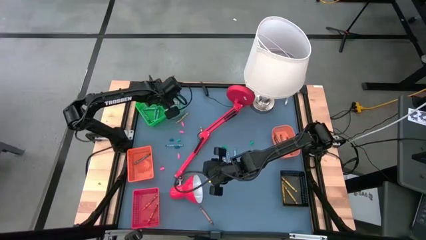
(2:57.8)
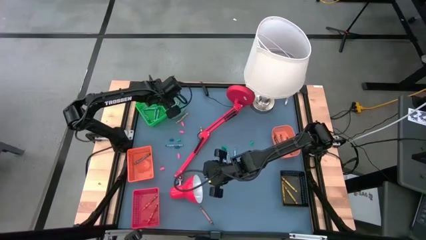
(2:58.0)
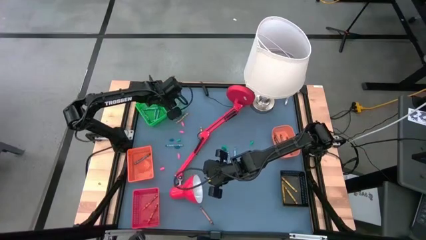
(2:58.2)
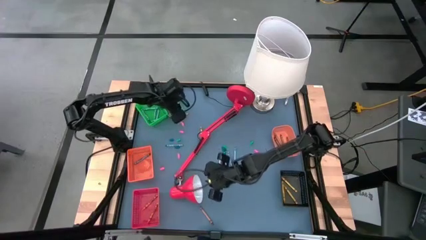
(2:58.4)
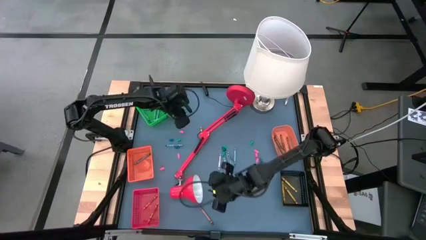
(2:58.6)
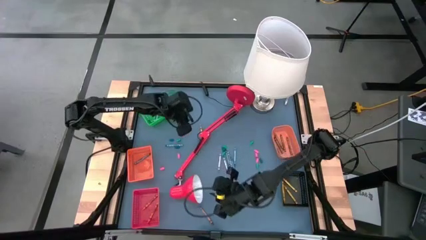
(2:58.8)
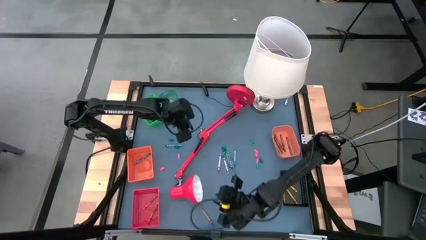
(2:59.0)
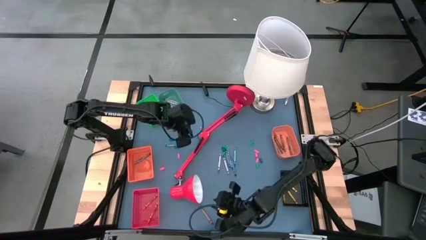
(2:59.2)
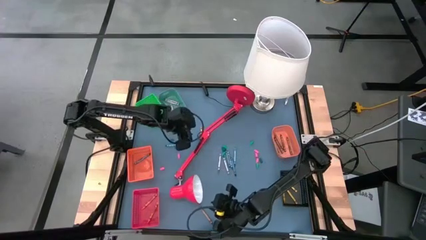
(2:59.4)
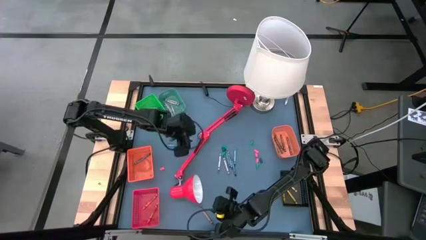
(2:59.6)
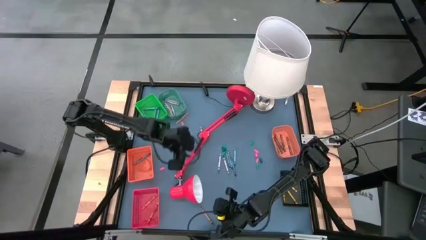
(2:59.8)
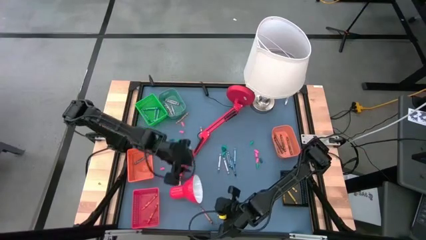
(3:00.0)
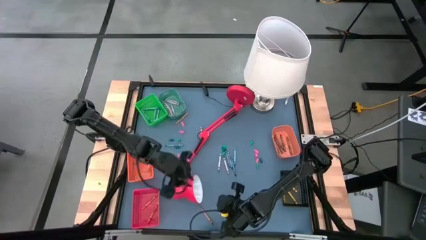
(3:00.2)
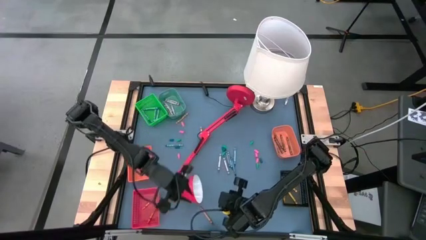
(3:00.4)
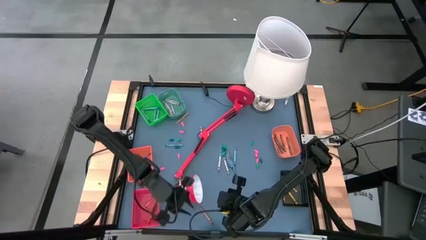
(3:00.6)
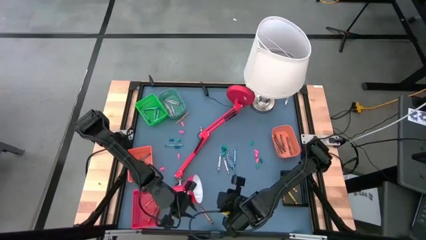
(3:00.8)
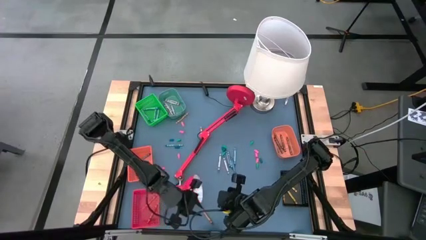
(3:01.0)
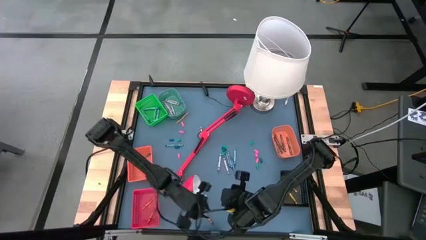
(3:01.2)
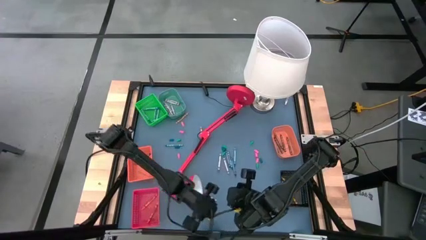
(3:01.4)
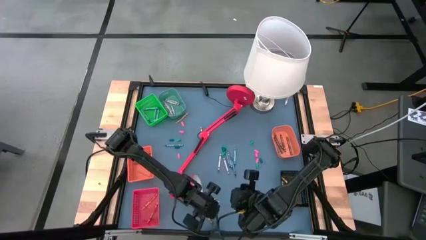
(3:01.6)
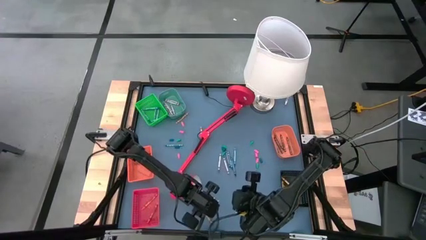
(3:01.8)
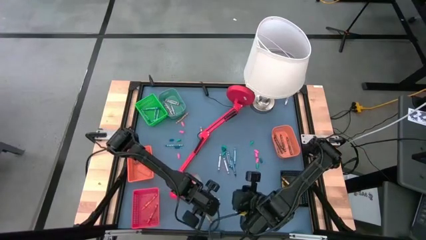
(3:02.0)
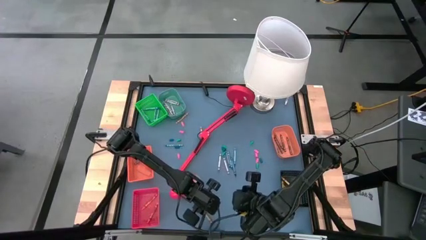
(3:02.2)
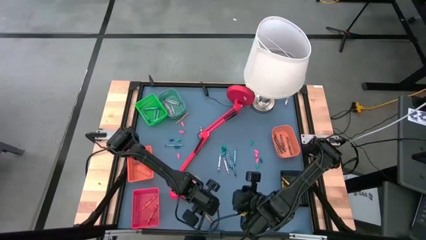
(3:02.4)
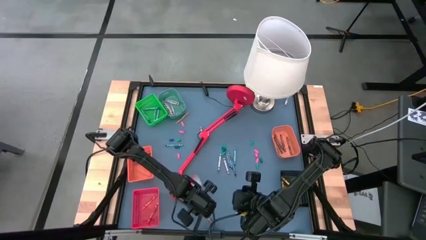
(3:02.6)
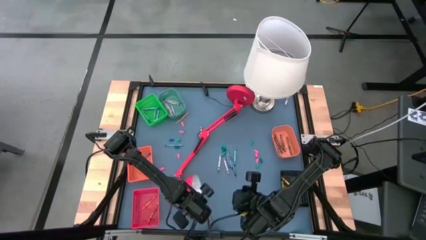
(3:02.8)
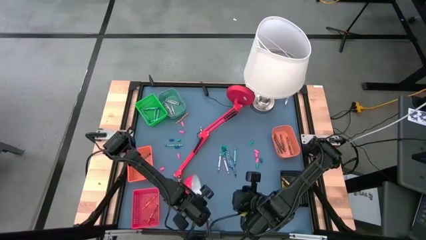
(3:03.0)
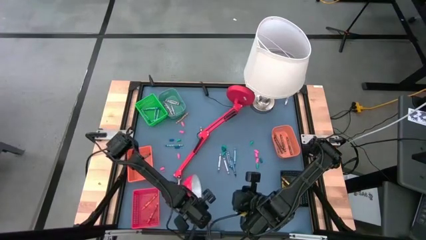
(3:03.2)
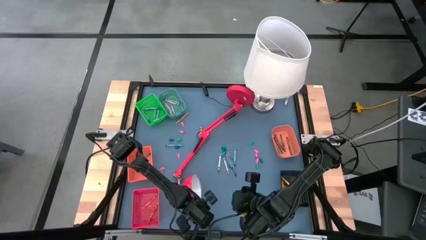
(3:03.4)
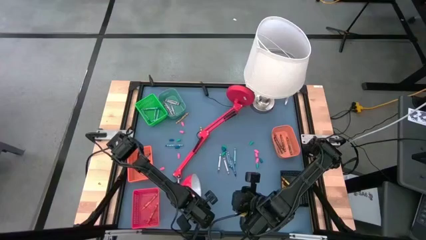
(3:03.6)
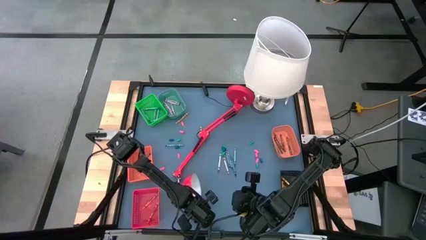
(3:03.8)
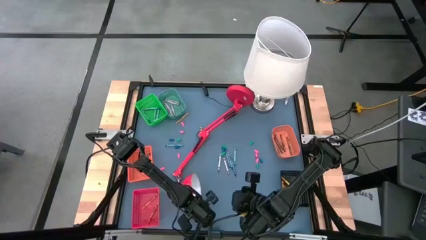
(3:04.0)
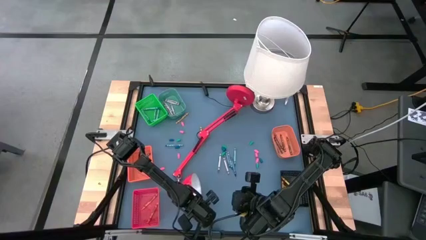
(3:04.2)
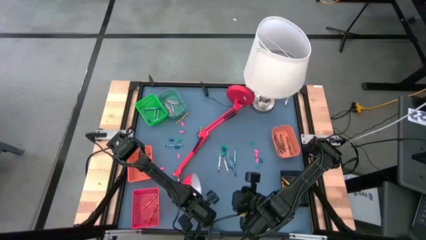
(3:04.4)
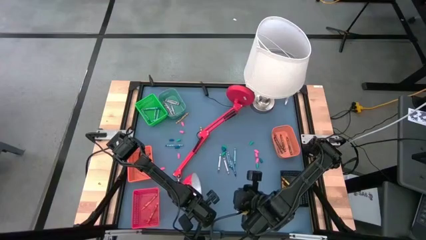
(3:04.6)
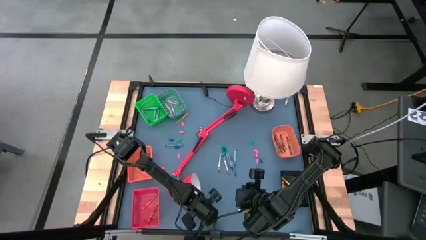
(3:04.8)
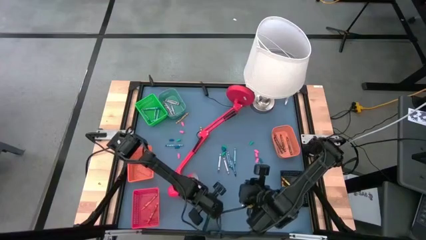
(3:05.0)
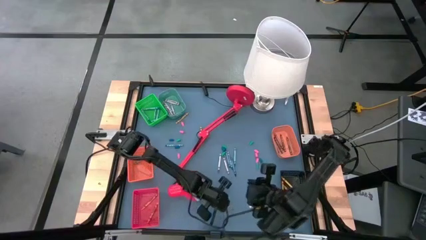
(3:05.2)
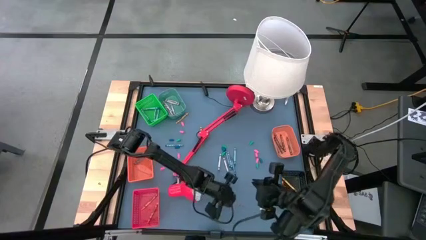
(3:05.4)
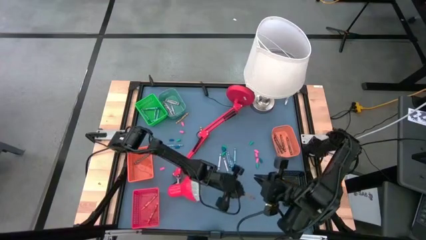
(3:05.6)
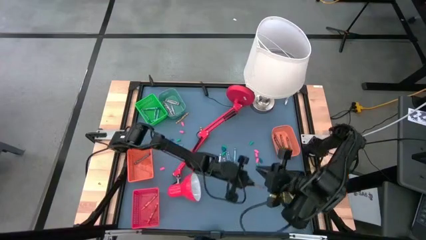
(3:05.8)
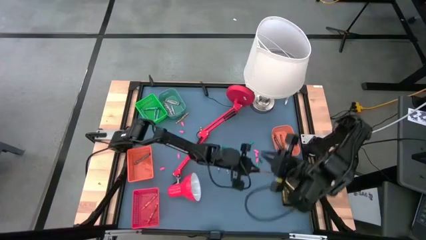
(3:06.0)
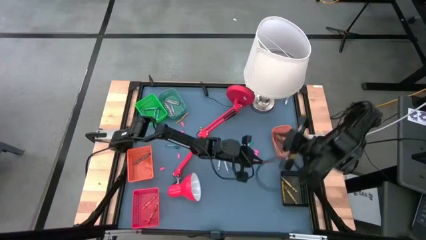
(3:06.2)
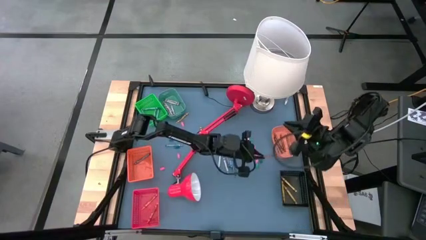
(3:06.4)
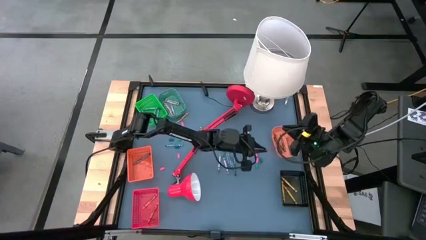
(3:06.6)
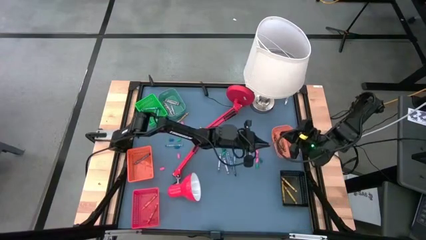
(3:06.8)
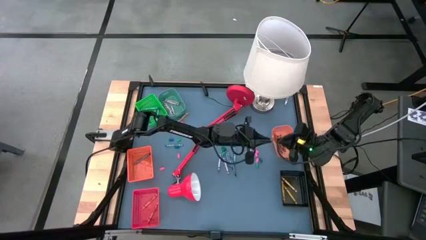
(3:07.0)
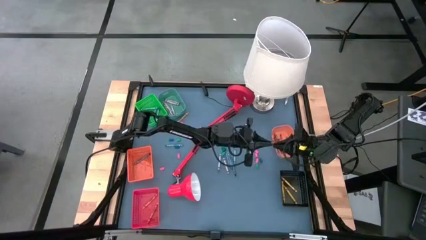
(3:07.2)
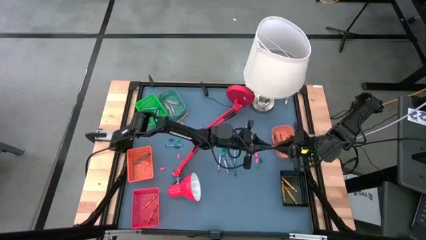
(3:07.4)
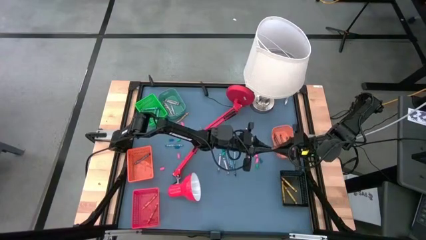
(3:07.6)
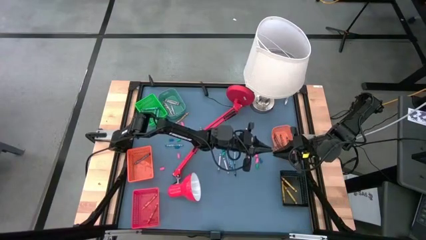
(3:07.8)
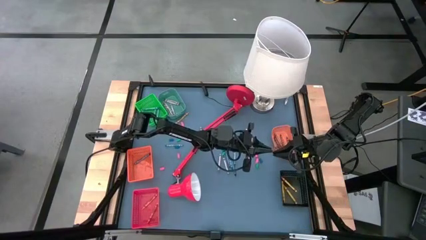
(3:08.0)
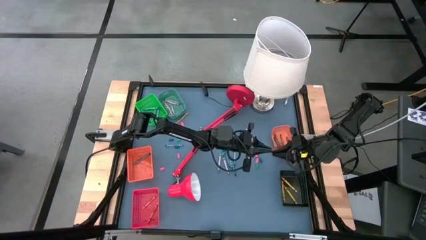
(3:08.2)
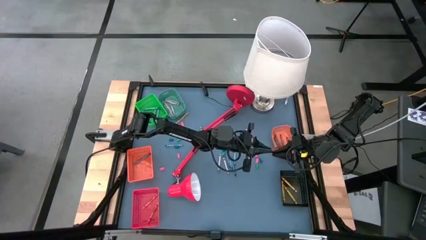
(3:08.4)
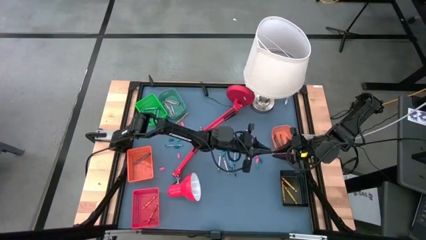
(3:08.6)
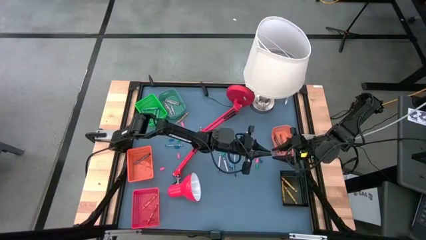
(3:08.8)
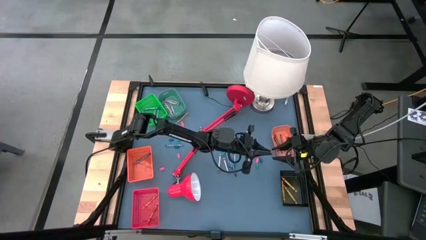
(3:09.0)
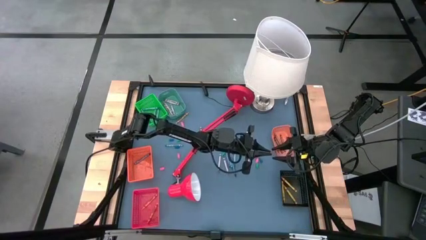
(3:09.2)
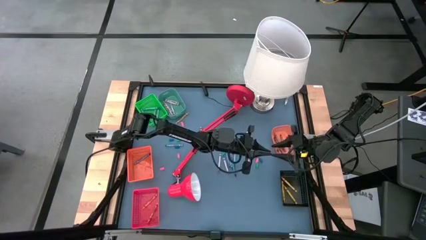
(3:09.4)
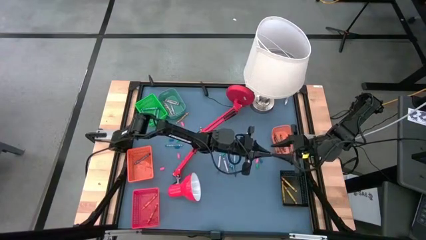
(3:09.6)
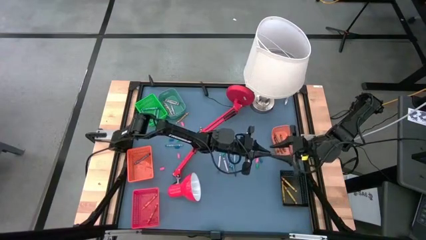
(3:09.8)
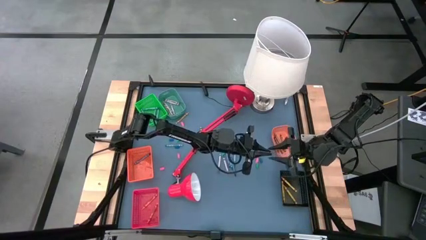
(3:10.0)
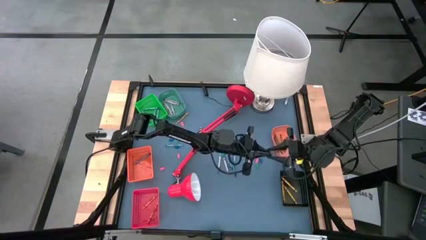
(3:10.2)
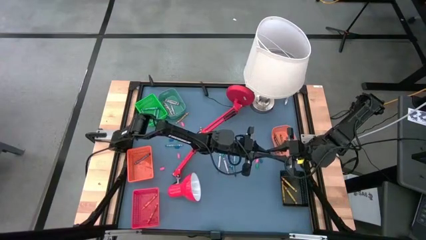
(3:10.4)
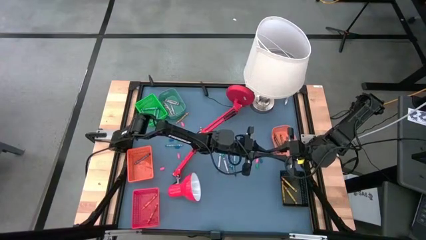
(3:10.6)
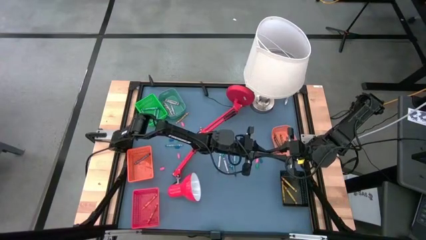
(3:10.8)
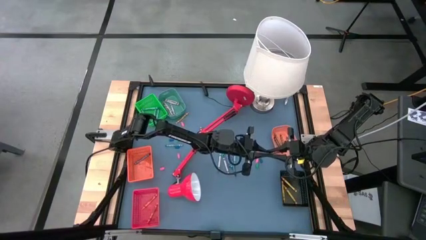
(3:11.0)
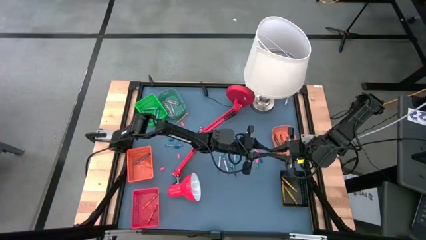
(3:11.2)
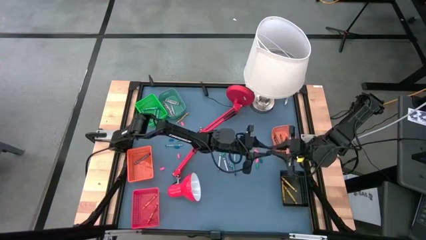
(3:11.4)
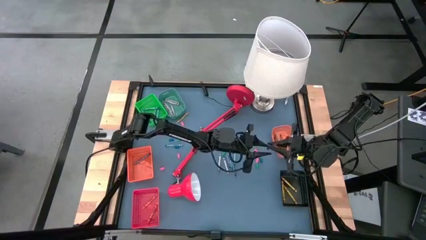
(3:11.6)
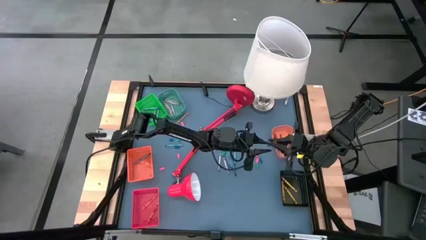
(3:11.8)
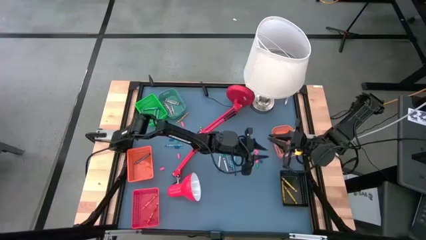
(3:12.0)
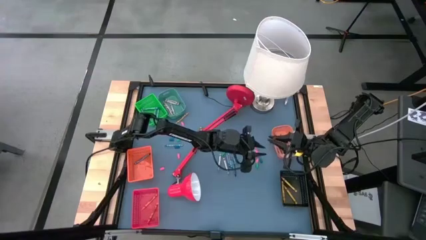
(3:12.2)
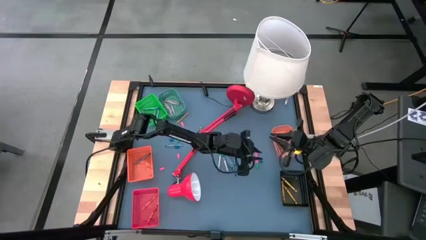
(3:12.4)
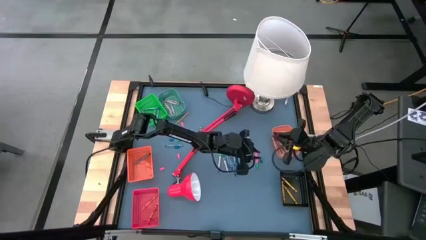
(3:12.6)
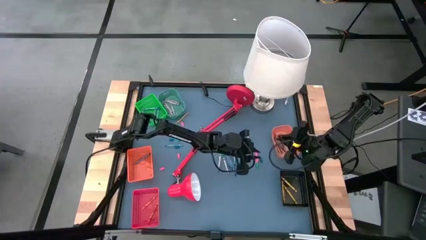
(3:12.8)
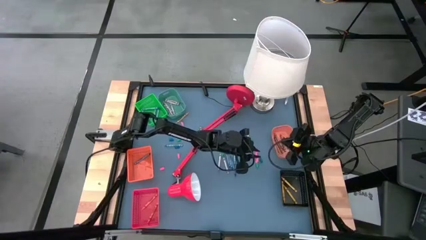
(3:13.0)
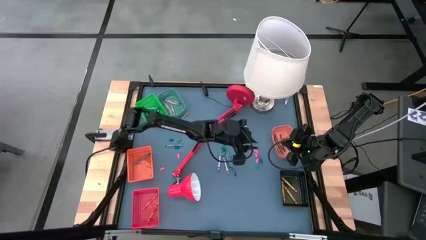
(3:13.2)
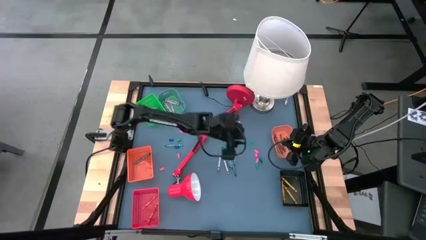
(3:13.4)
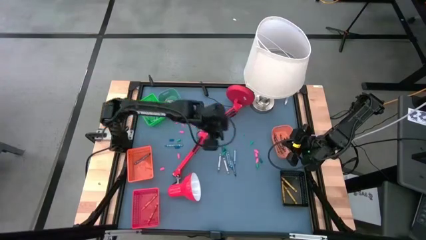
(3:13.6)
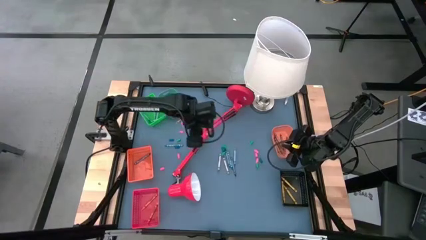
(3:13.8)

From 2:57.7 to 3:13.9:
Task: Sort crayons
Put the brown crayon into the right orange bin

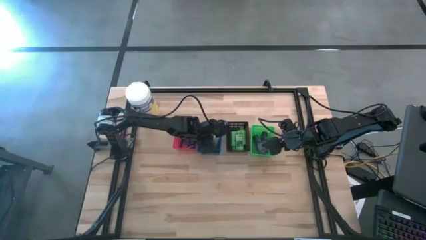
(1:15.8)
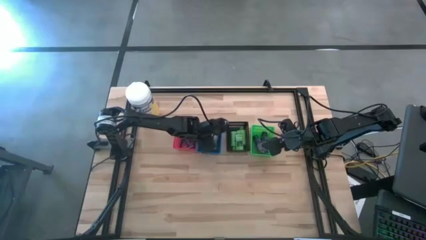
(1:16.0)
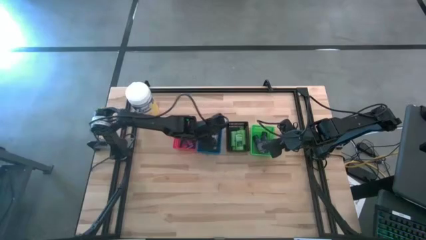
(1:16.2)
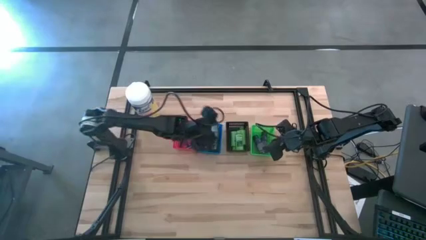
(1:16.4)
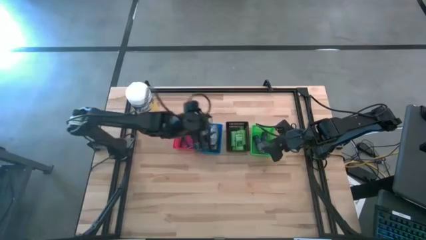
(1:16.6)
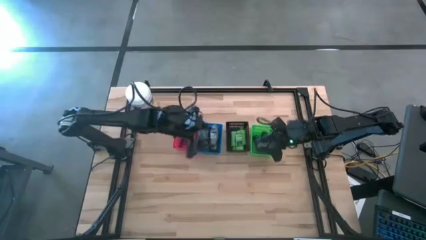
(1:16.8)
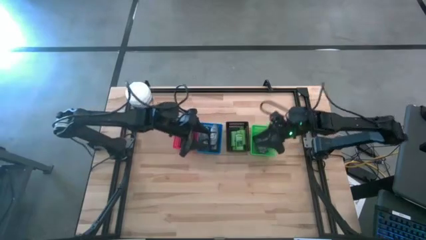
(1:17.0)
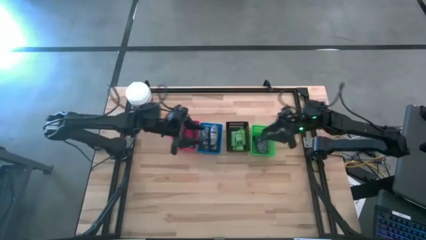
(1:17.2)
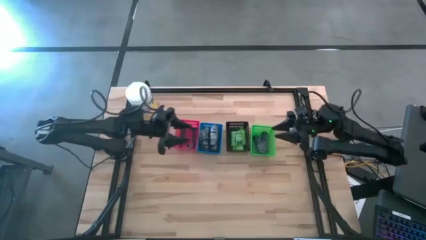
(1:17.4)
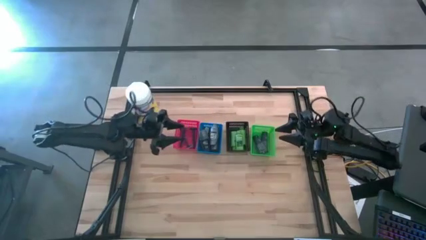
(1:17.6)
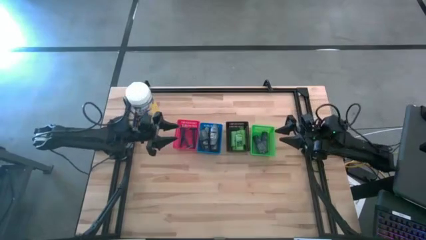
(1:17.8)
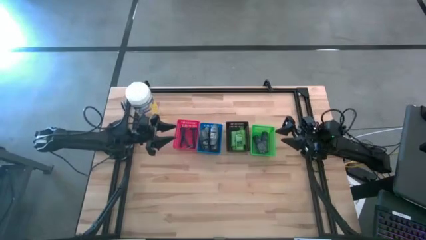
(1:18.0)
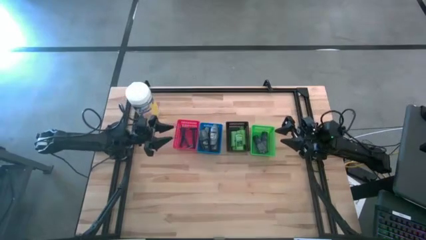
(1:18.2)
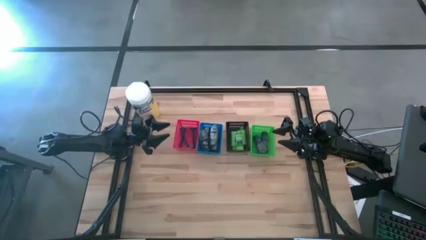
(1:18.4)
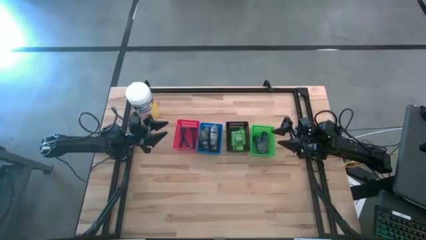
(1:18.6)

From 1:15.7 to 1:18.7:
Task: Pick & Place Travel size toiletries
Return to Home Position
